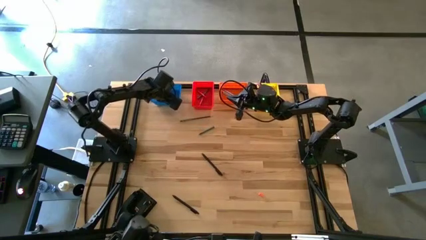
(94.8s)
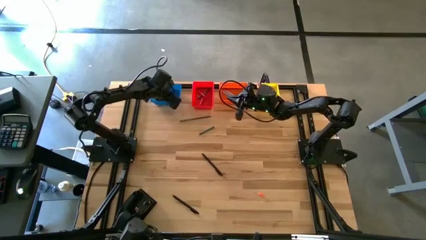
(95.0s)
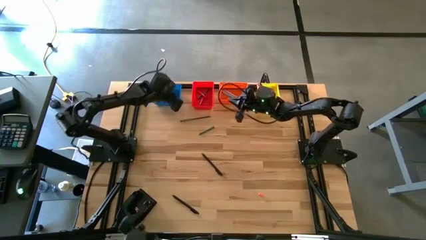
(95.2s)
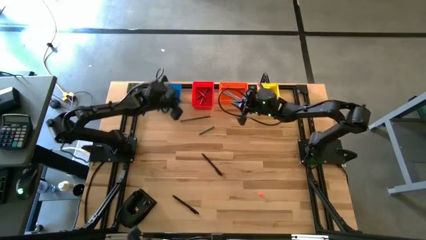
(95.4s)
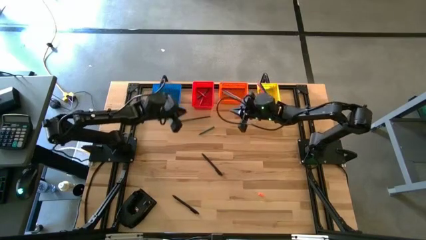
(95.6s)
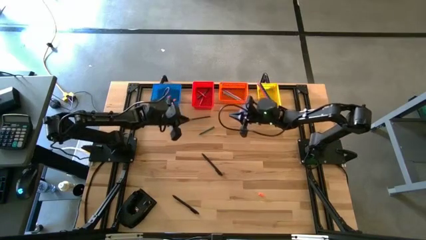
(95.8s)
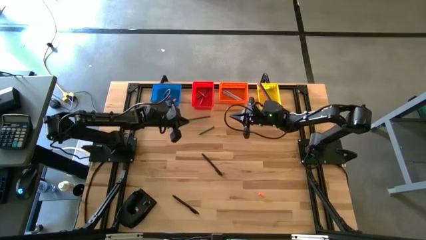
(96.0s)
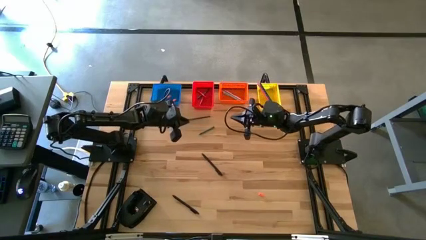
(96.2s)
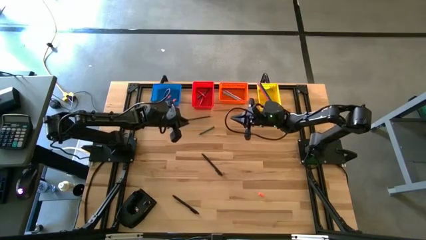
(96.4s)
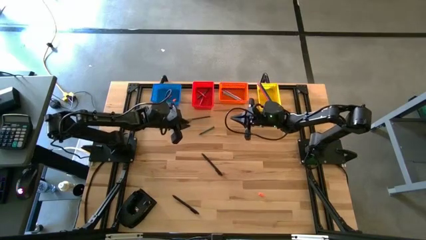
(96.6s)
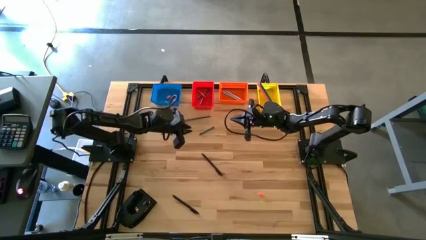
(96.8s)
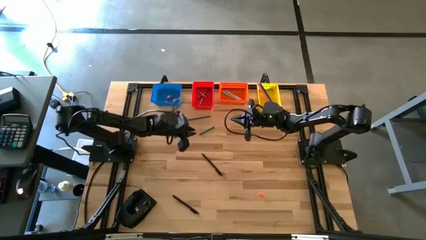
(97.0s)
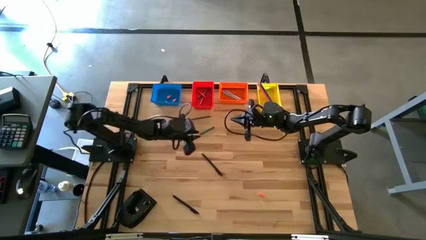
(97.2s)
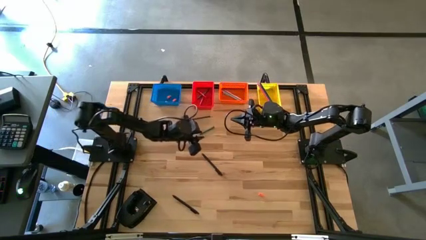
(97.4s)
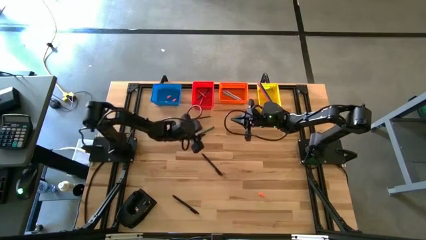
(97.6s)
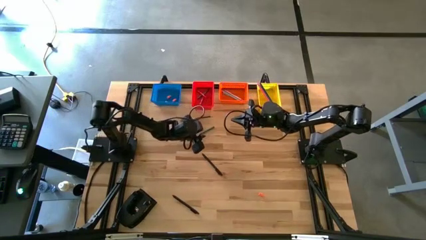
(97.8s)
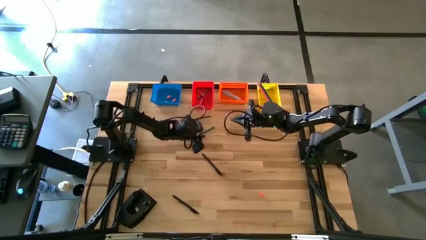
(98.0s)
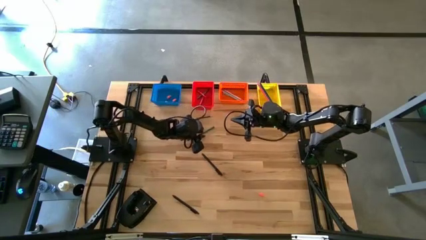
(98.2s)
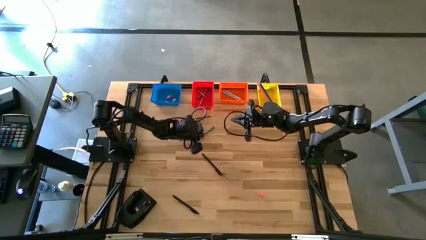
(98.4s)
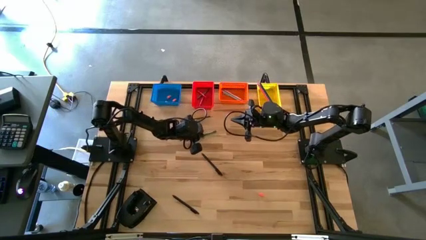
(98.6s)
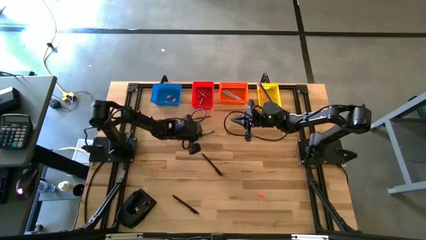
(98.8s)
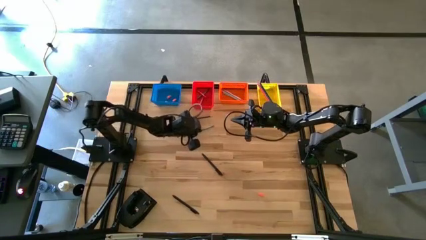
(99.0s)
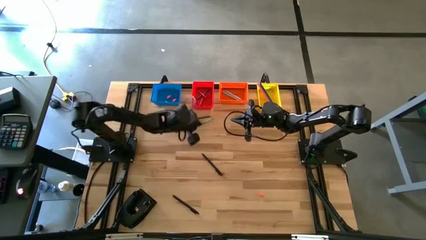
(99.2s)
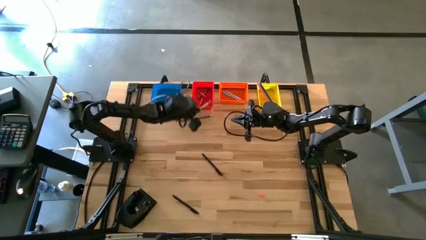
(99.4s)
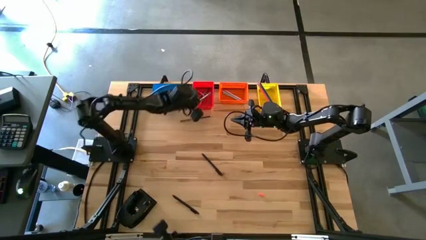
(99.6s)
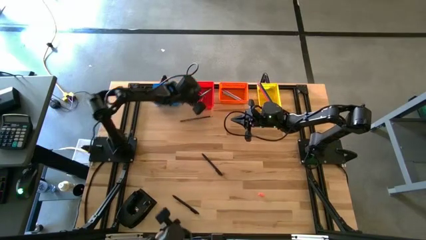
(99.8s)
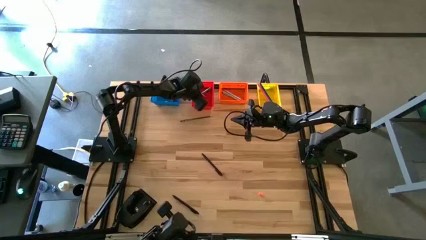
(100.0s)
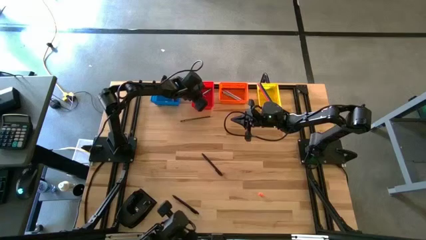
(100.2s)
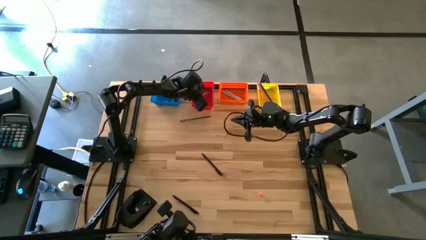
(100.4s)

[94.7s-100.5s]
Task: Sort crayons/erasers/pens/pencils in bins
Put the green crayon into the red bin

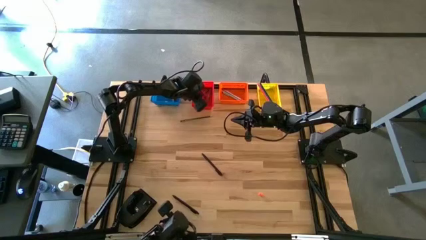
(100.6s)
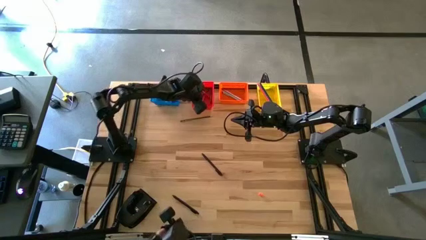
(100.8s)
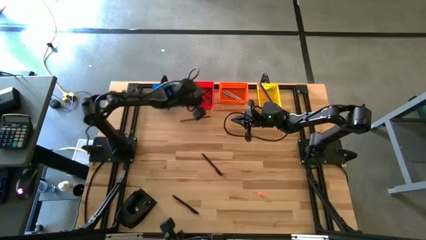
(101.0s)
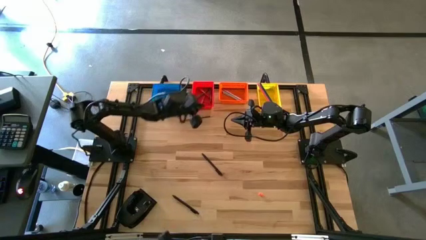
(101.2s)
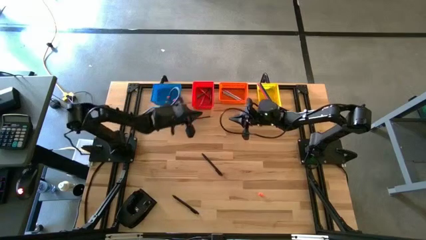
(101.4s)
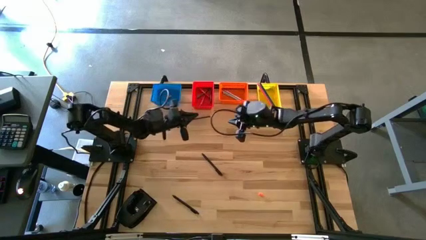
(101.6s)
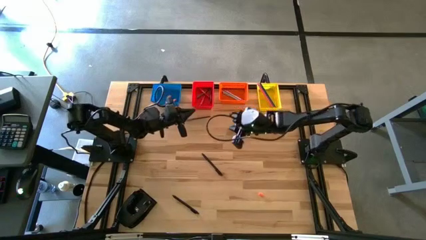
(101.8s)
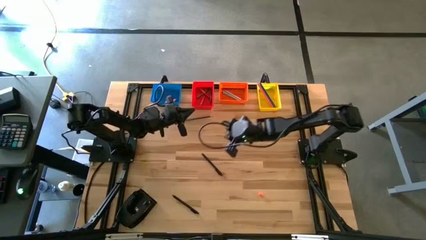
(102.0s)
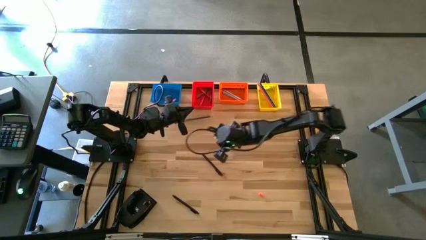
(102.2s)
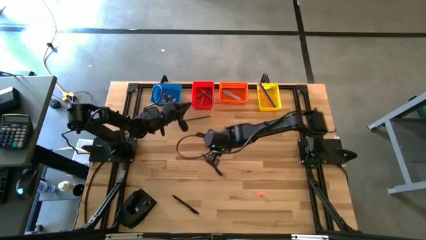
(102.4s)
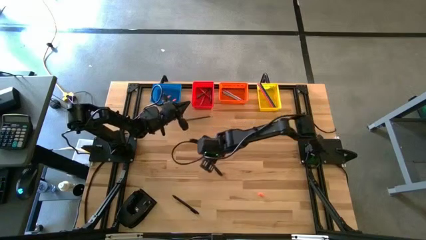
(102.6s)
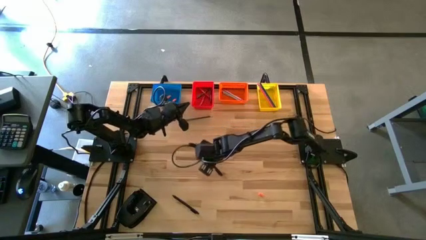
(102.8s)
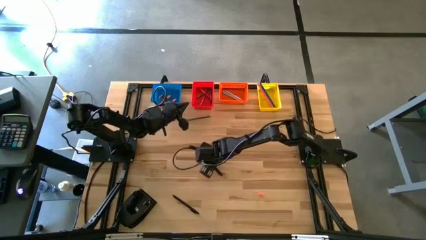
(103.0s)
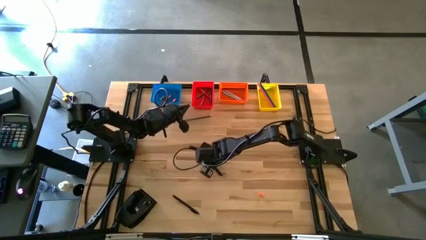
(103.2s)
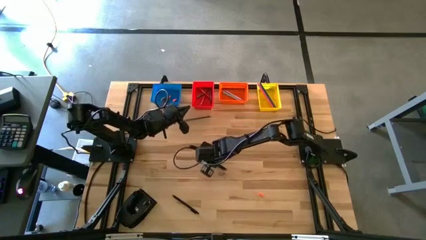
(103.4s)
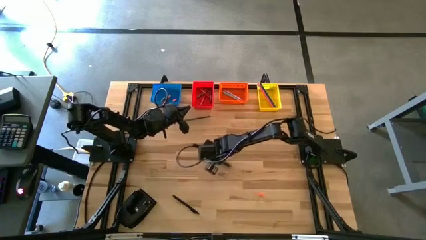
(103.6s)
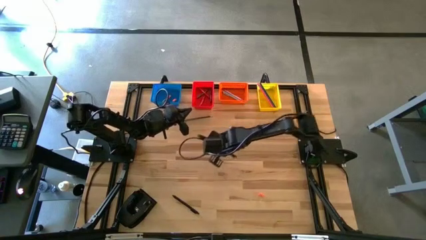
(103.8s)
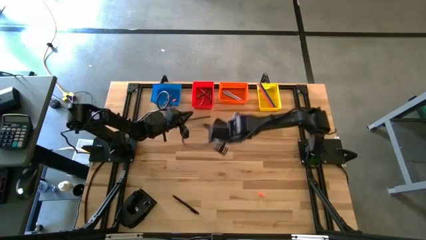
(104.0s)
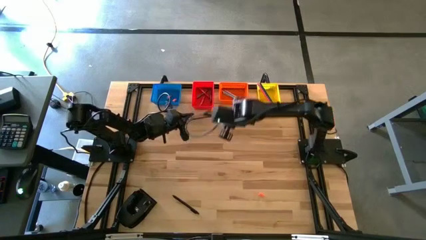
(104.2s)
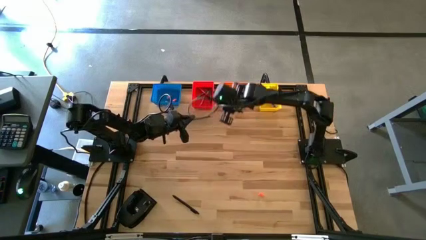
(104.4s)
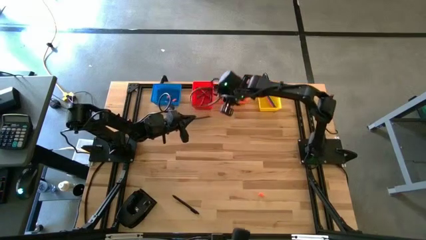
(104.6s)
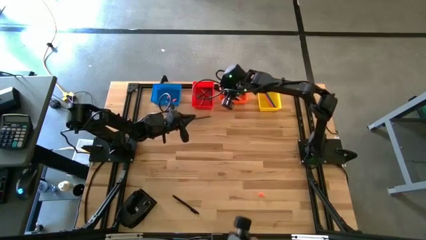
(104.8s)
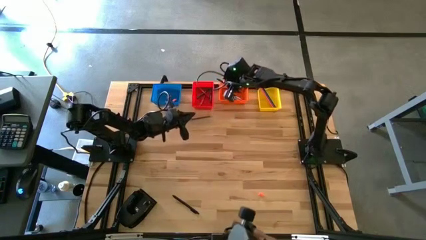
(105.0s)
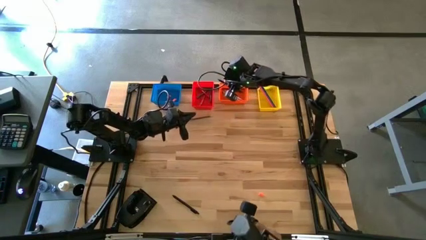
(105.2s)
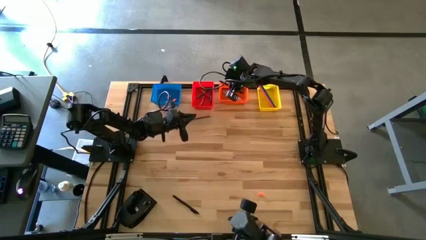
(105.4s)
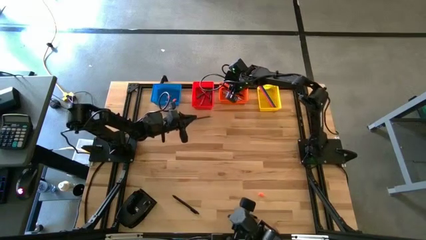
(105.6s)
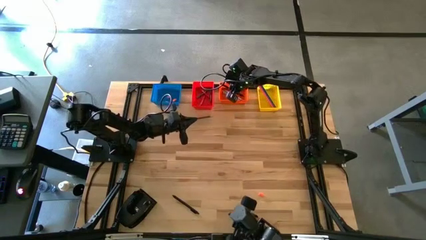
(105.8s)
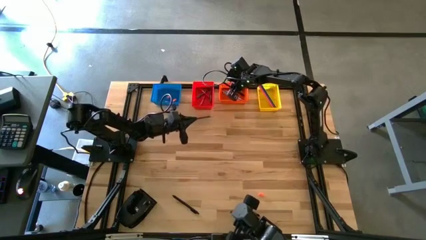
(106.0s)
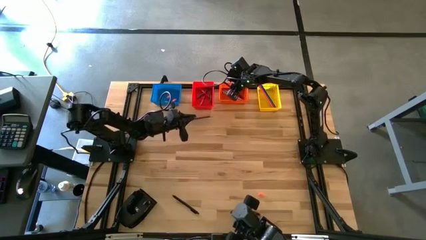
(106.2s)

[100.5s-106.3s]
Put the black pen into the orange bin
